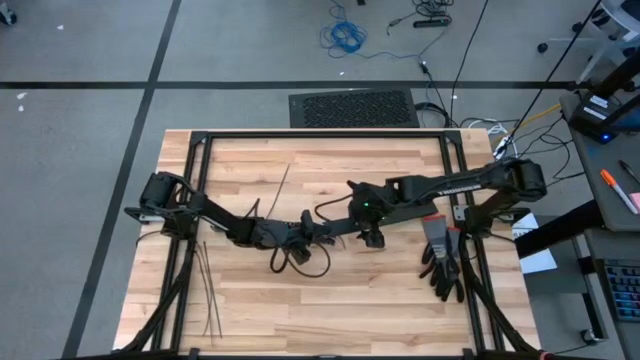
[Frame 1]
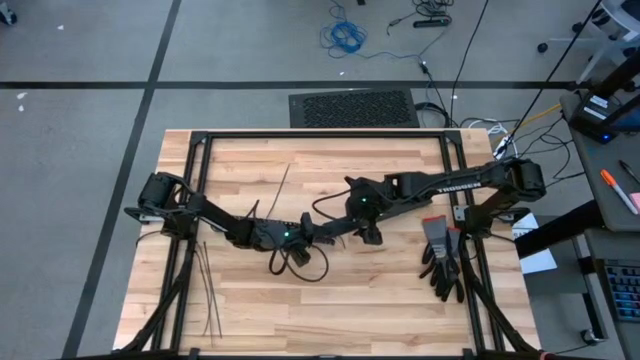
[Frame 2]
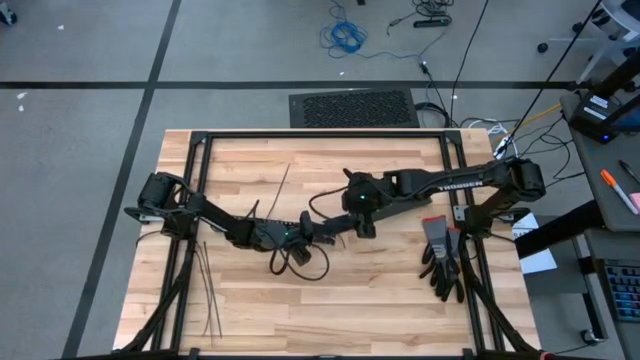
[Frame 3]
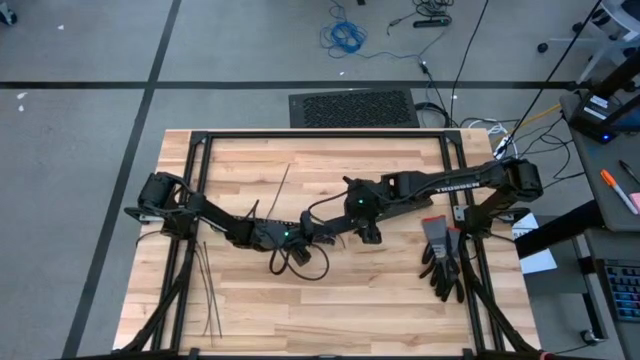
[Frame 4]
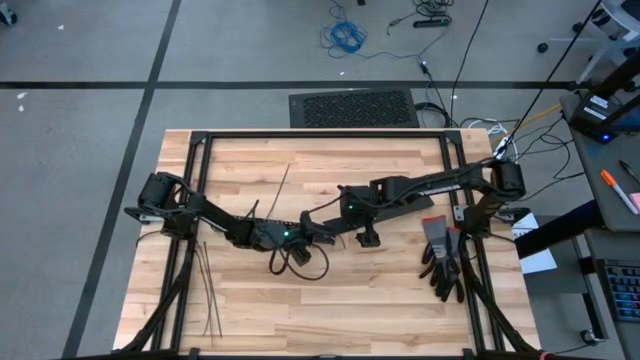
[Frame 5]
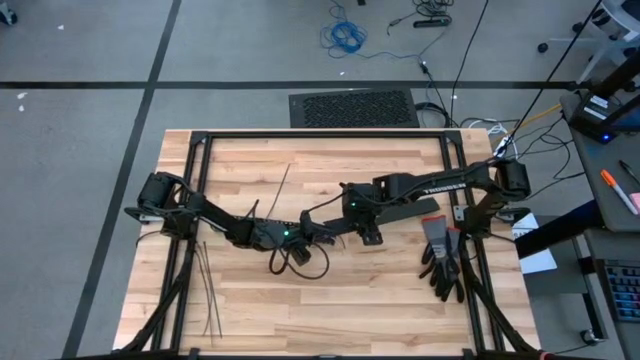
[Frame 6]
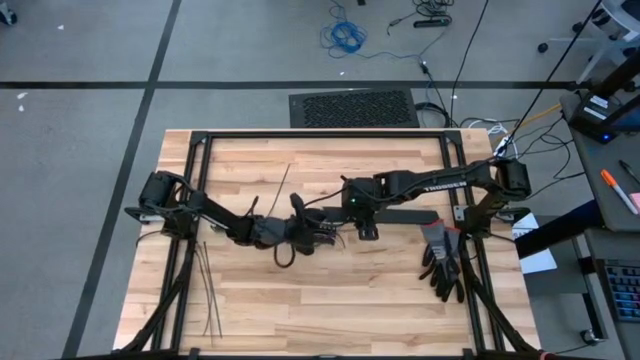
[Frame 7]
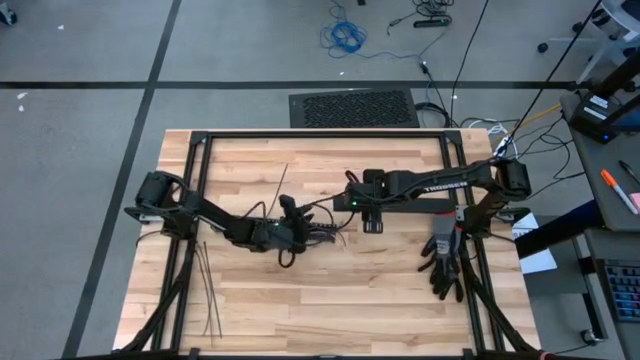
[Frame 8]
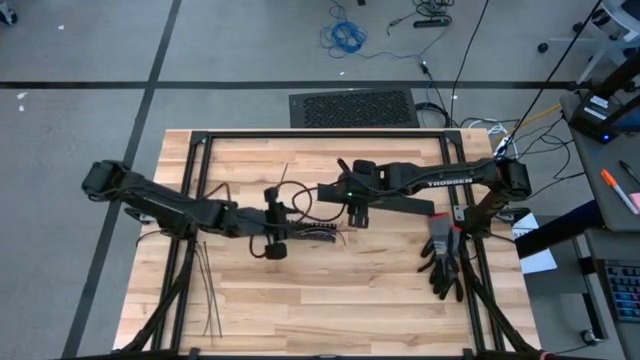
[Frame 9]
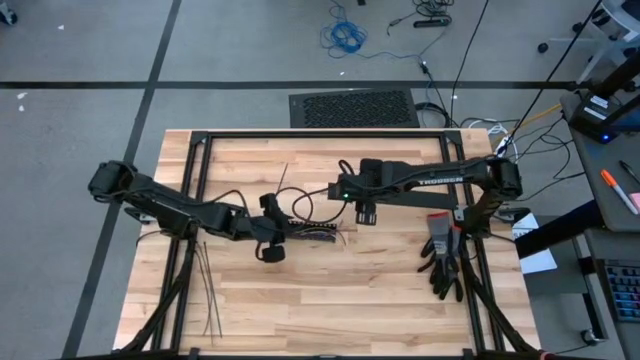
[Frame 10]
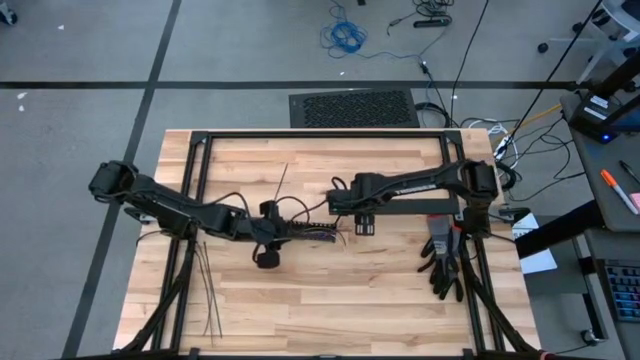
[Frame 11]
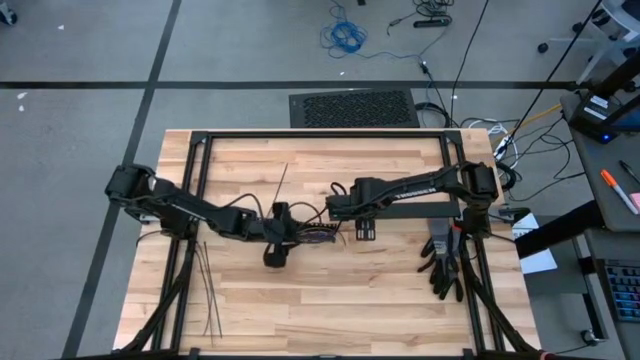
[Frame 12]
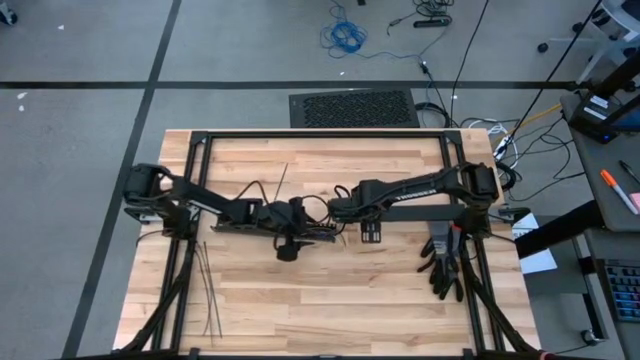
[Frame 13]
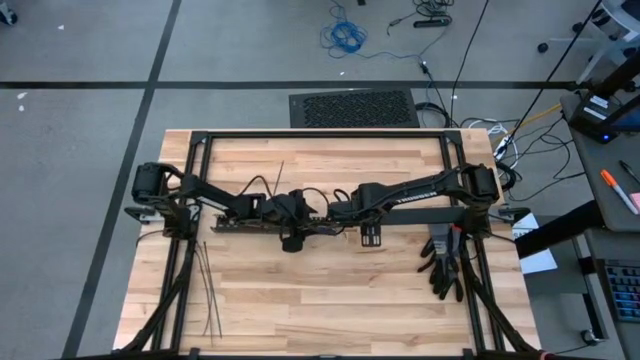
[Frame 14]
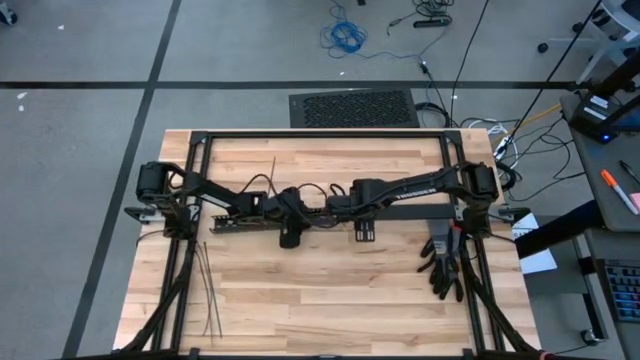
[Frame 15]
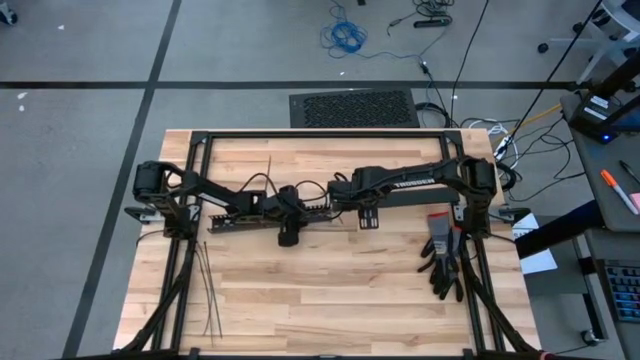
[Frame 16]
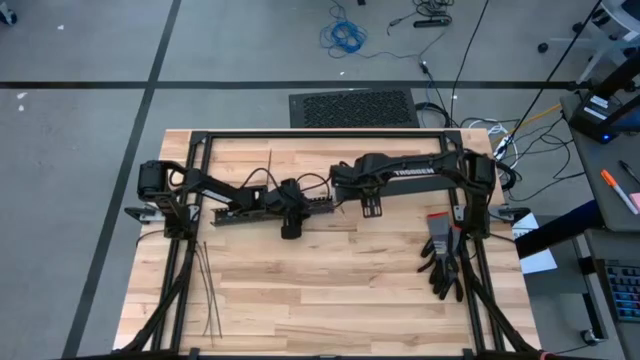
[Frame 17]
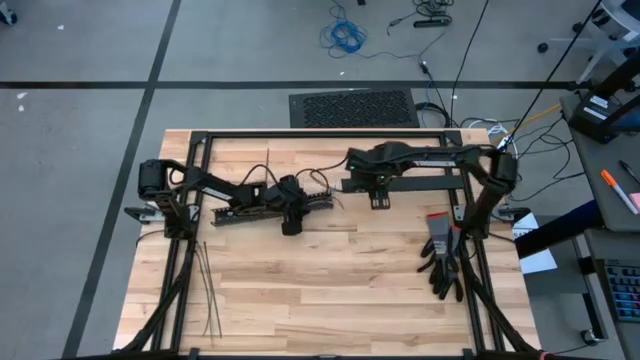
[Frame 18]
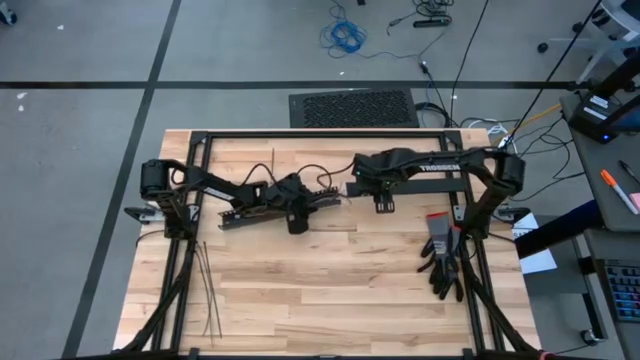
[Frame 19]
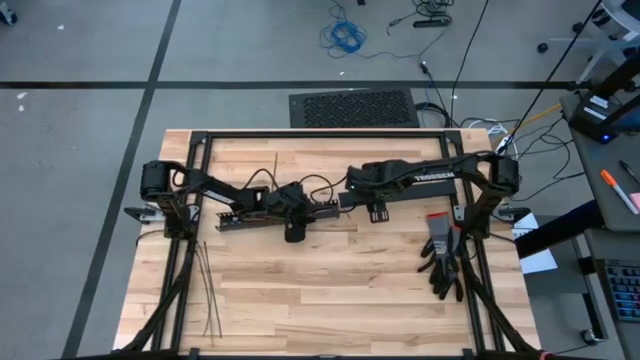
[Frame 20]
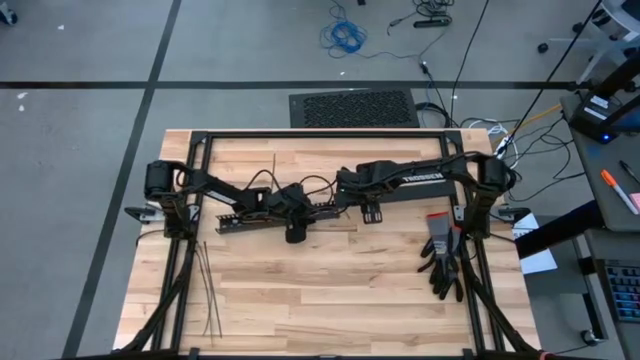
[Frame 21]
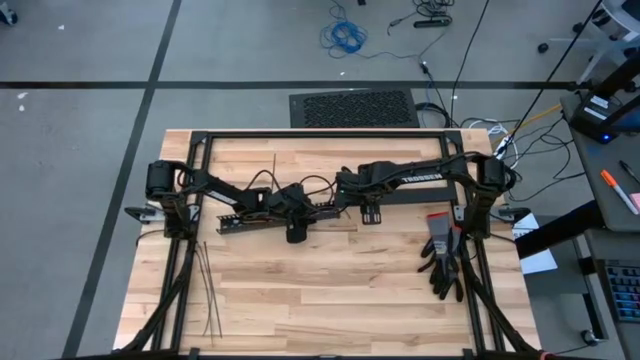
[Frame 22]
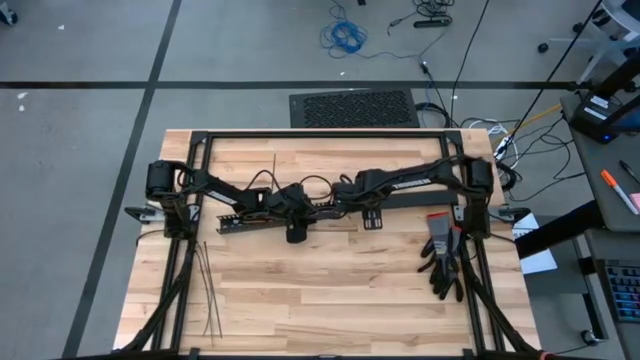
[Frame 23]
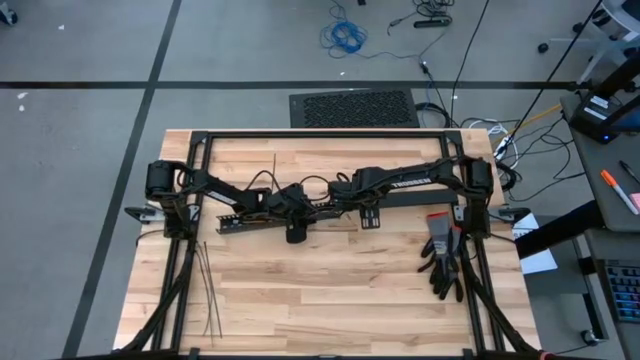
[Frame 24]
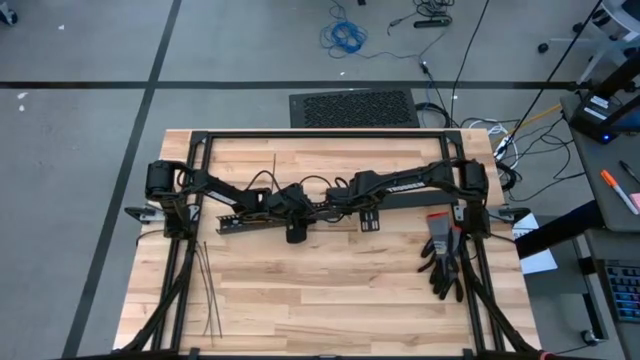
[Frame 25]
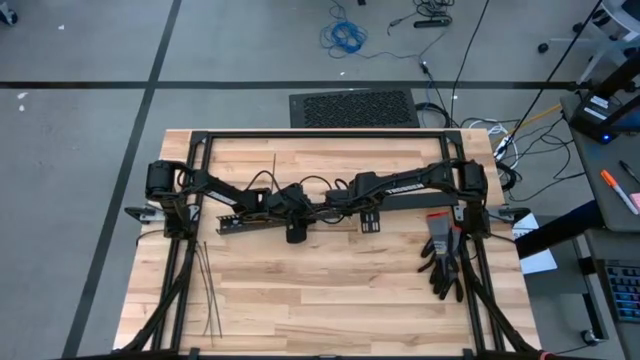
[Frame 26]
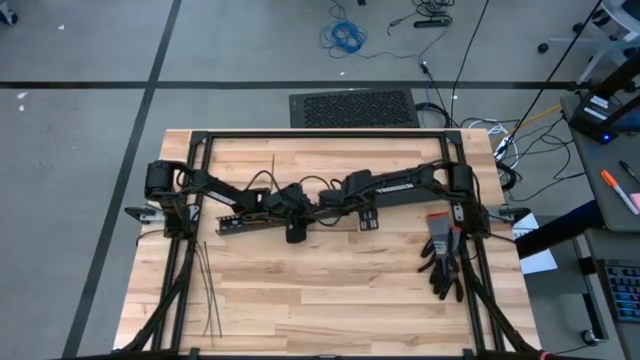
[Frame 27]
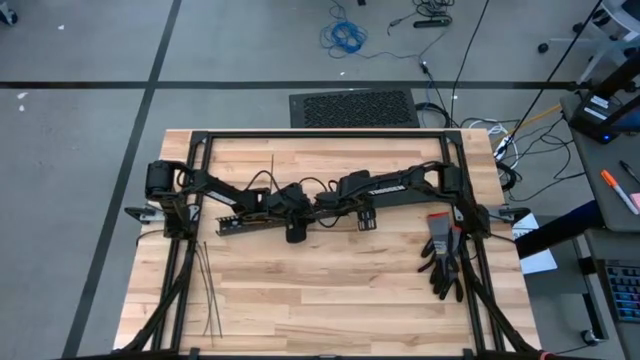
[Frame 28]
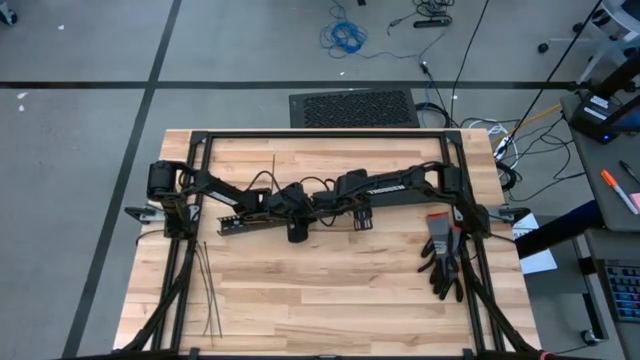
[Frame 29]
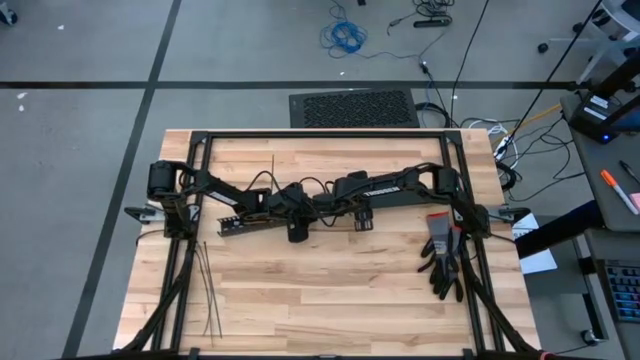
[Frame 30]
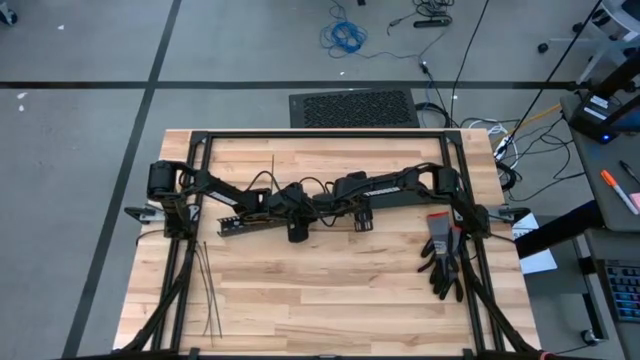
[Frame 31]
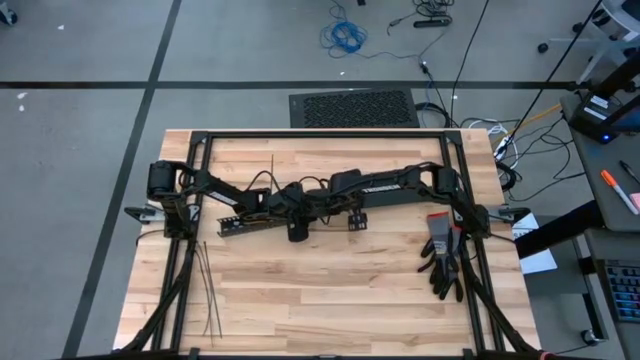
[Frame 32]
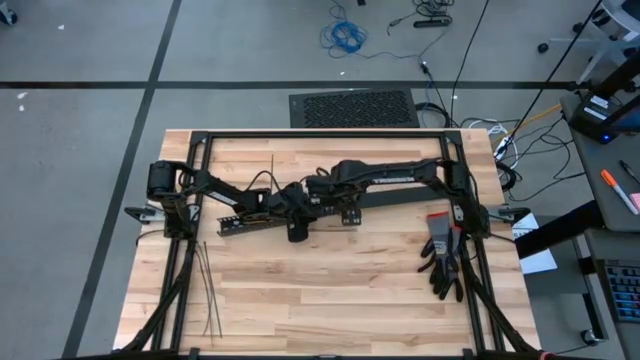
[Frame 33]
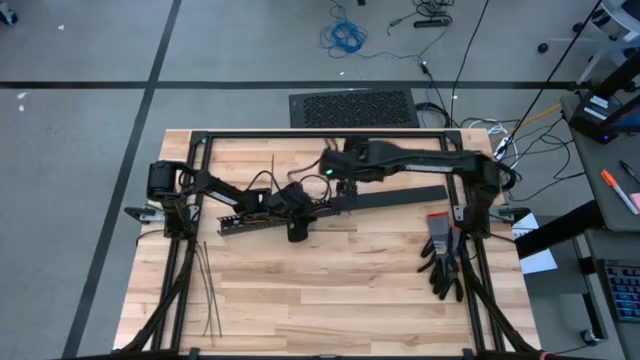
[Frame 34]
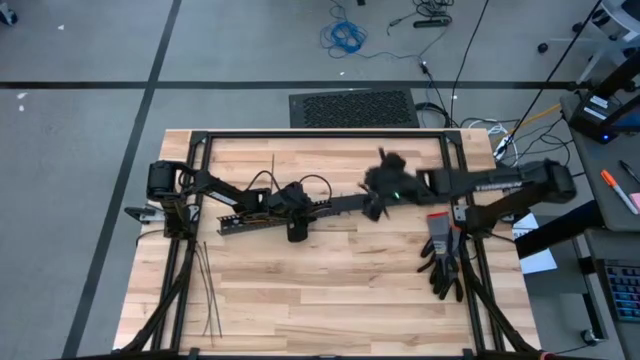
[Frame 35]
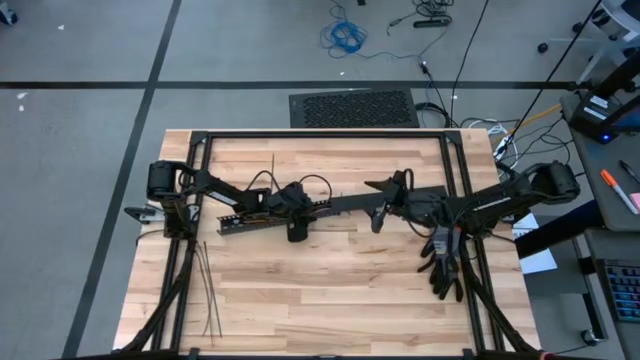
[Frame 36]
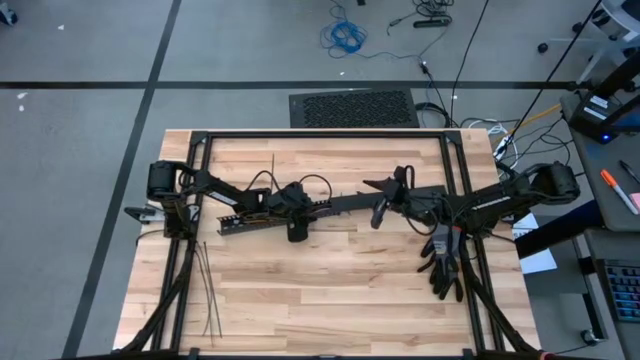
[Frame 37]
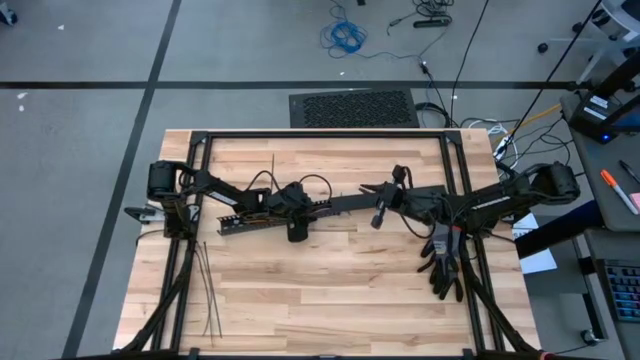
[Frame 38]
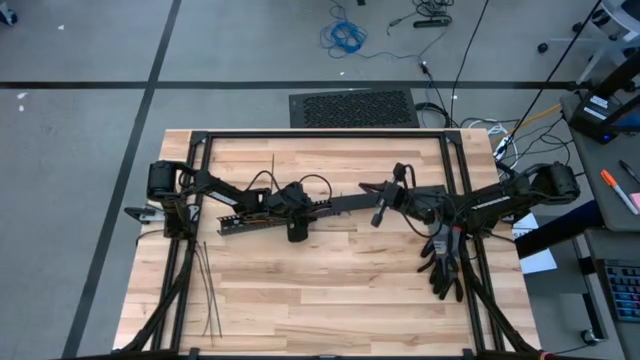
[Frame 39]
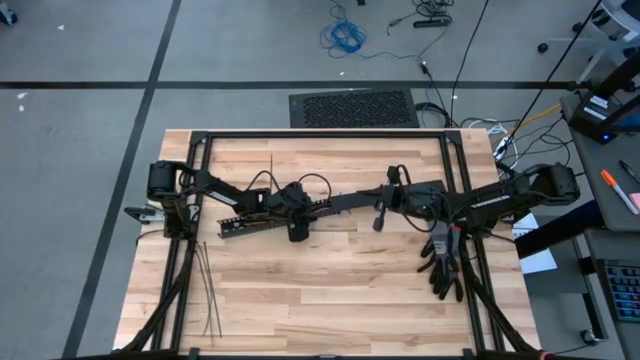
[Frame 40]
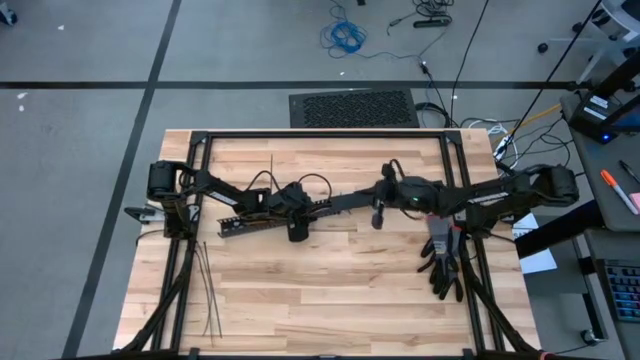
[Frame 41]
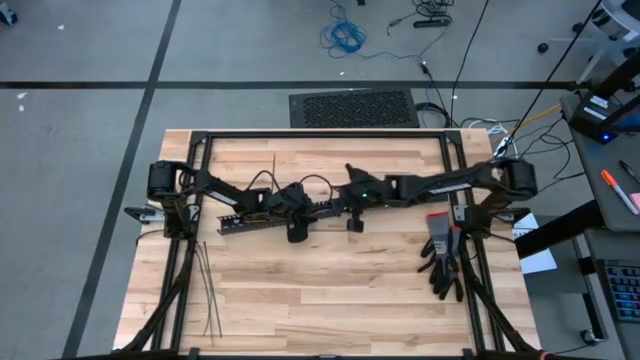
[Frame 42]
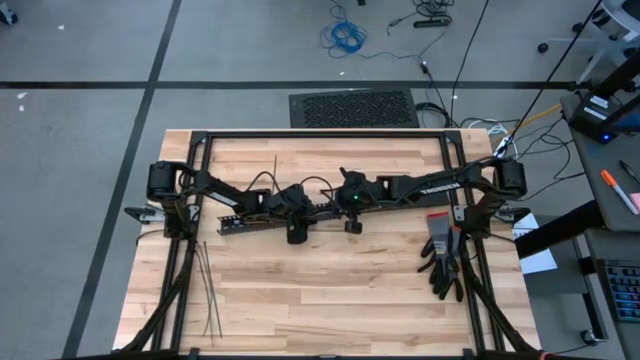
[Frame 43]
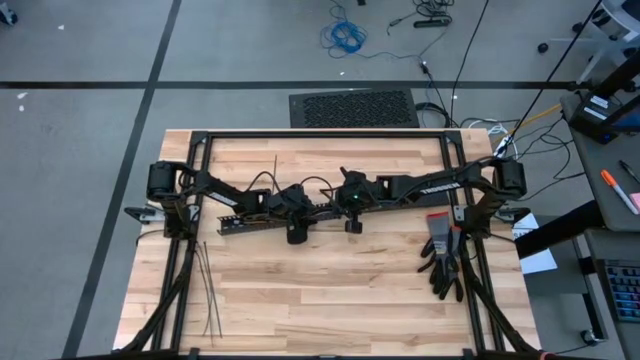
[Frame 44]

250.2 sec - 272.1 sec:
Task: Ziptie cables
Close the black cable duct
